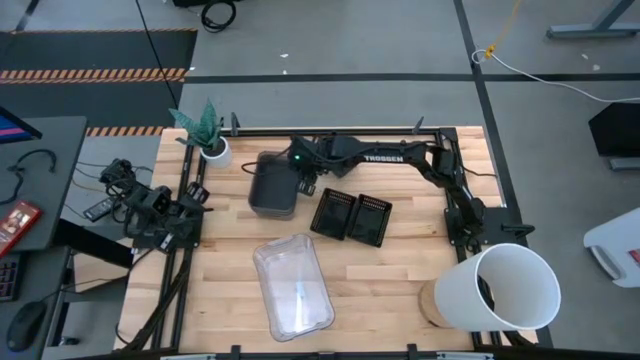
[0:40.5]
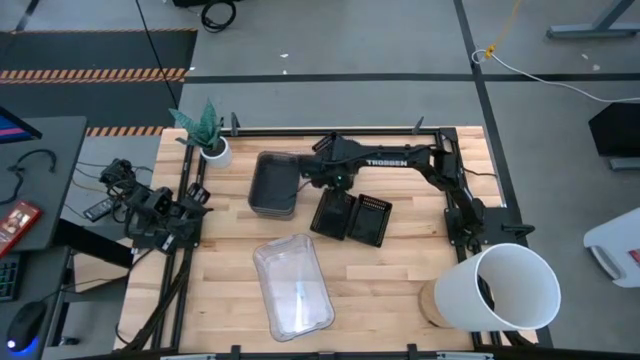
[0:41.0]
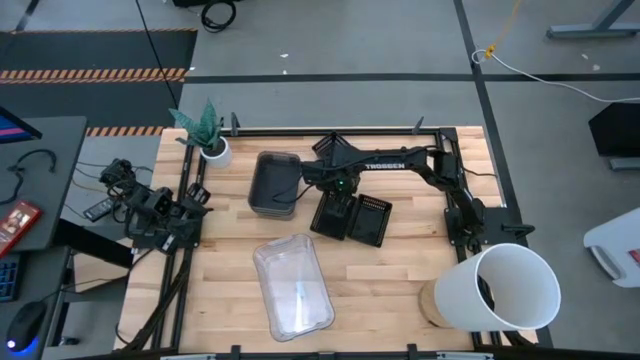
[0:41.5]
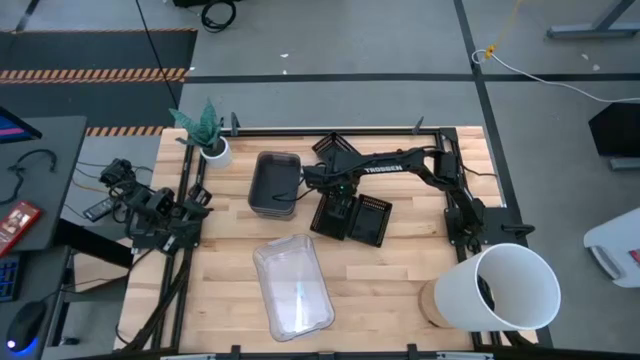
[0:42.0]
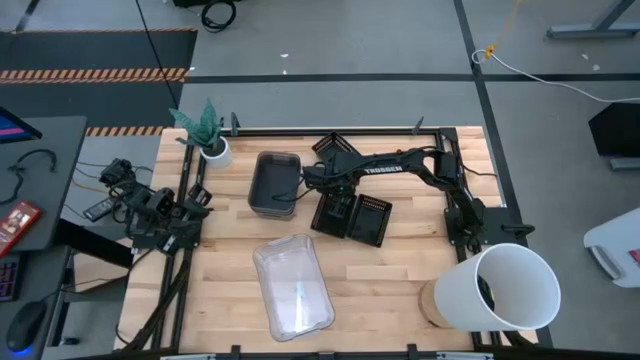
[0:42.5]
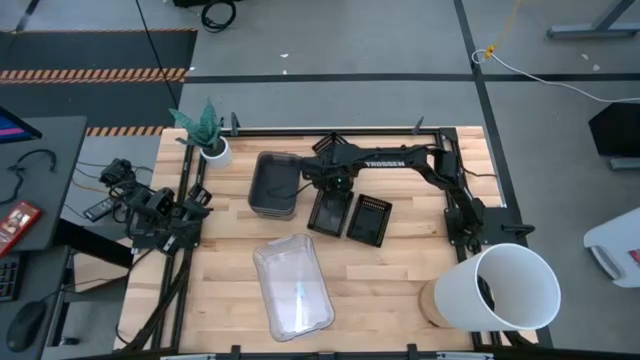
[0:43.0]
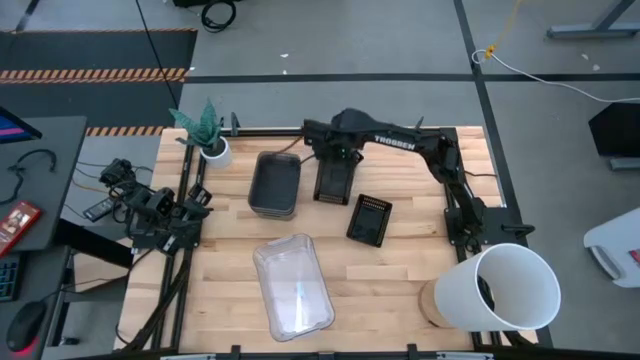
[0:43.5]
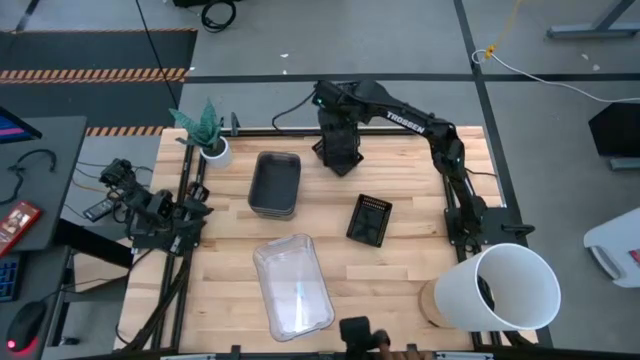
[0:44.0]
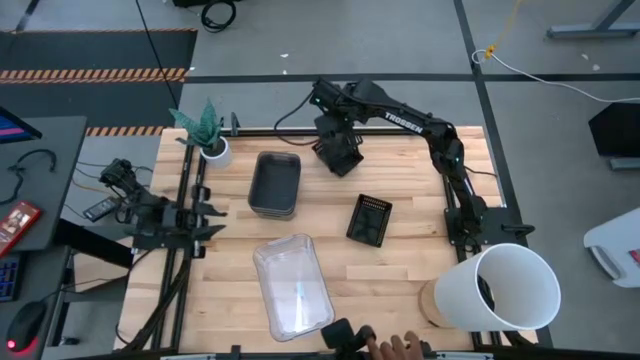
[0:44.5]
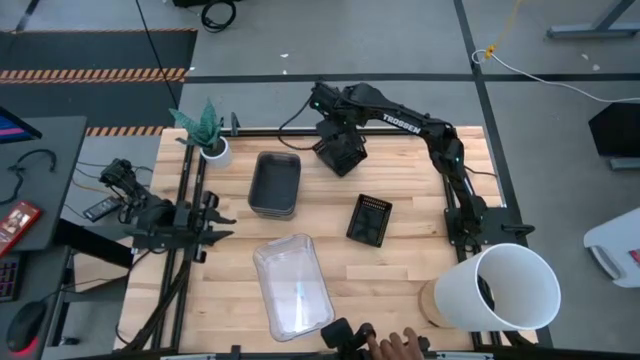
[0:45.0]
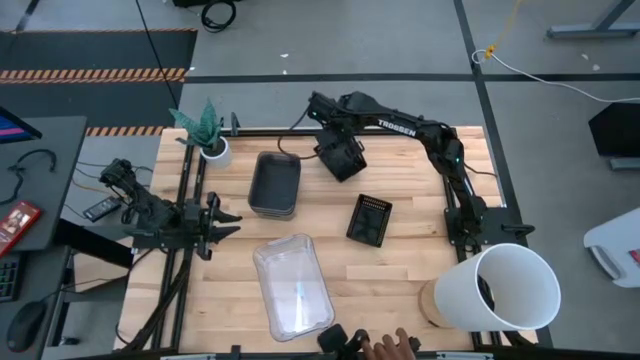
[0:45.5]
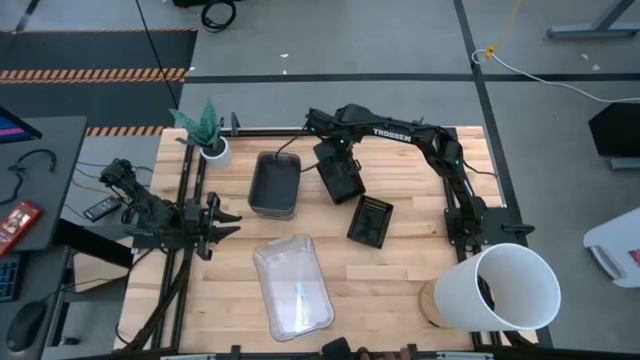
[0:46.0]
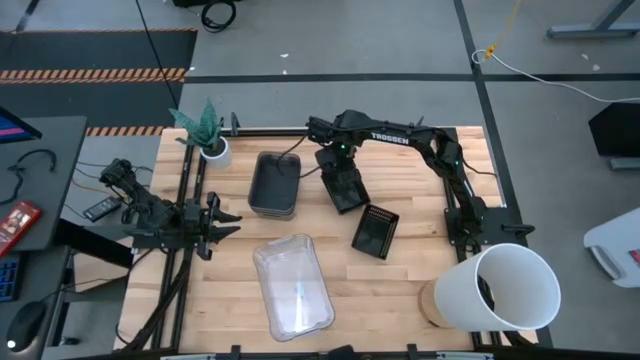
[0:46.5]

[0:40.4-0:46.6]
Stack the middle black bin on top of the top black bin

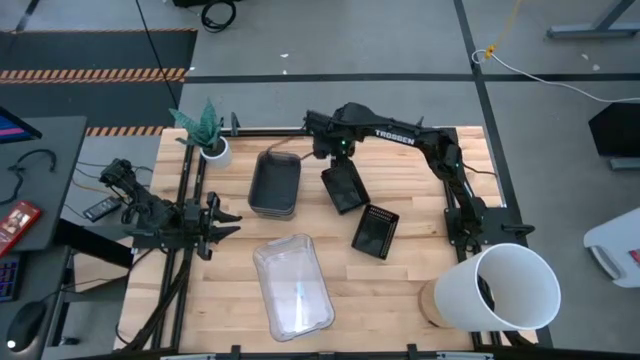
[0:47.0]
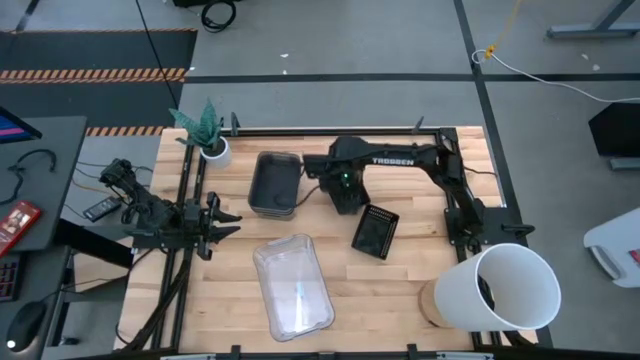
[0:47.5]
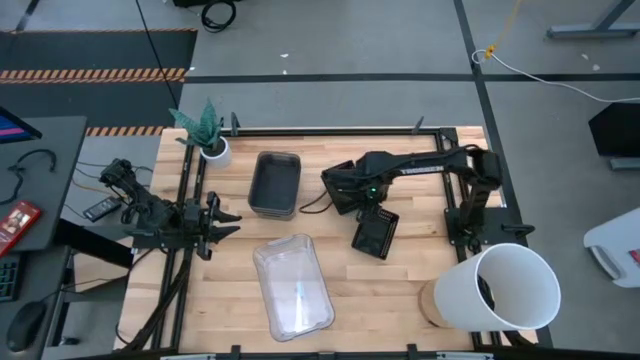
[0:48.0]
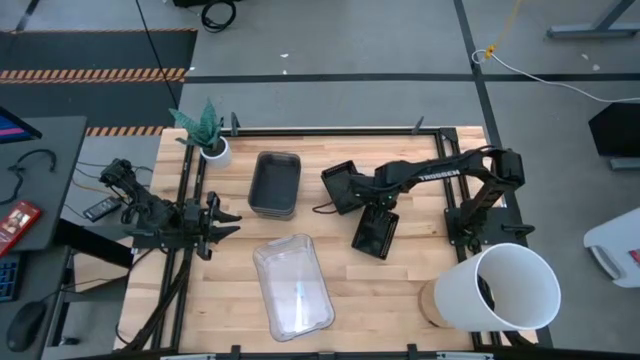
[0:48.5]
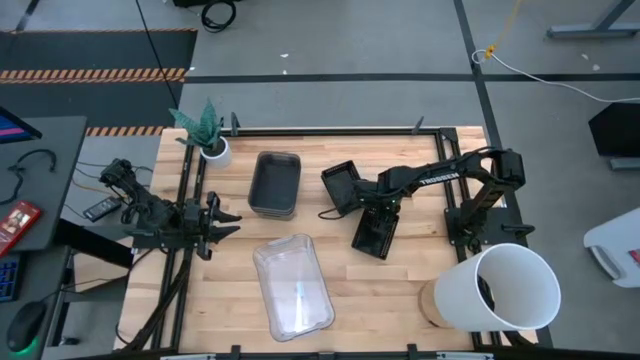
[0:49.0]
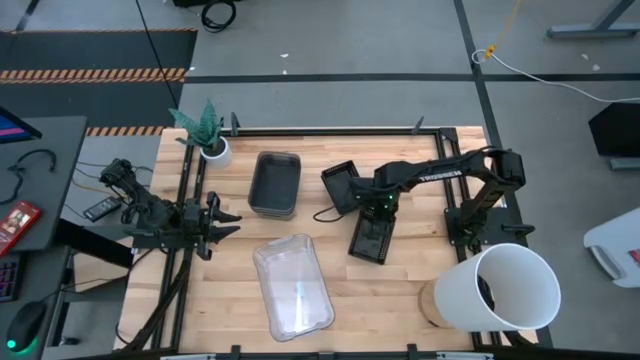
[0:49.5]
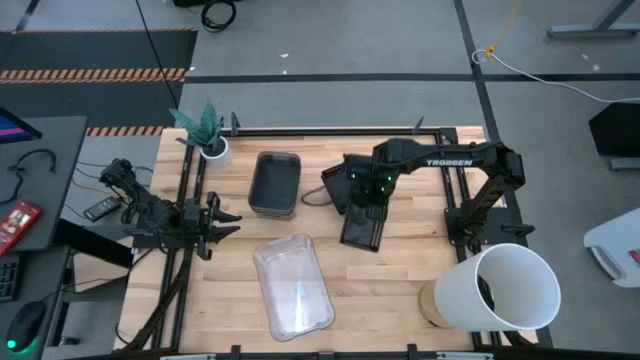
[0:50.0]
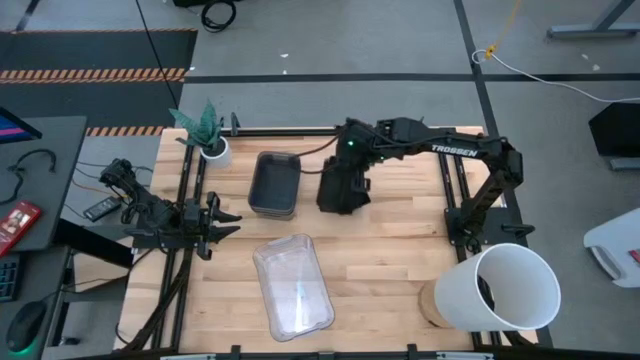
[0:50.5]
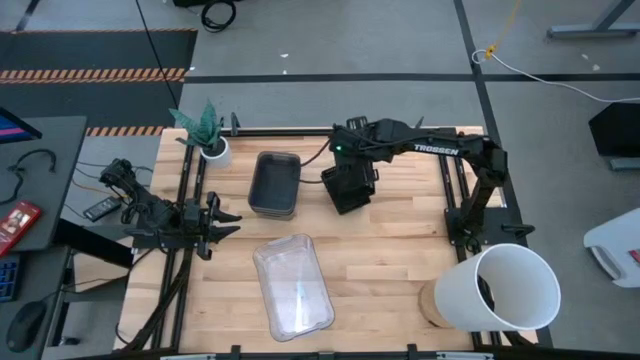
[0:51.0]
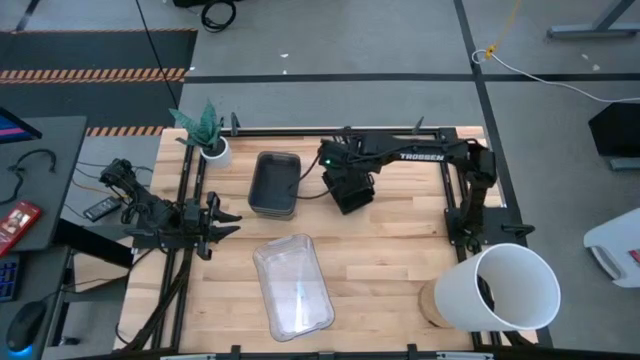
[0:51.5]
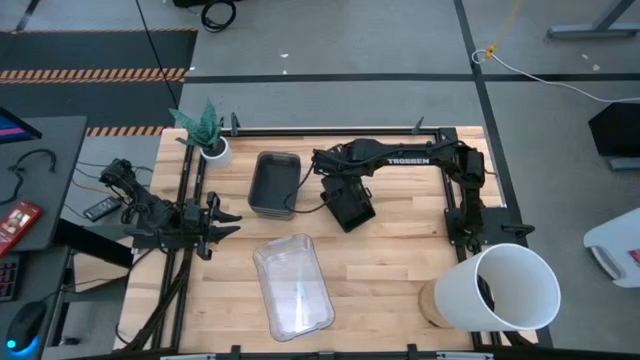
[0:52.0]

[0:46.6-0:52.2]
Stack the bottom black bin on top of the top black bin

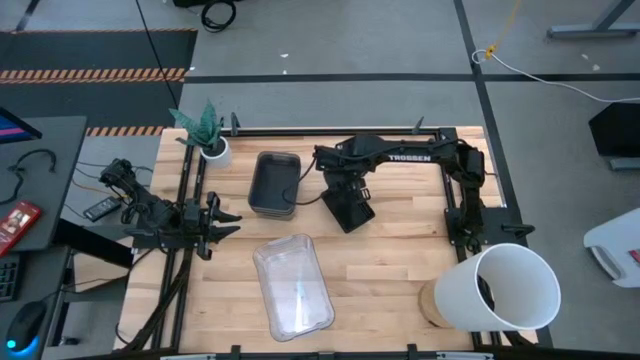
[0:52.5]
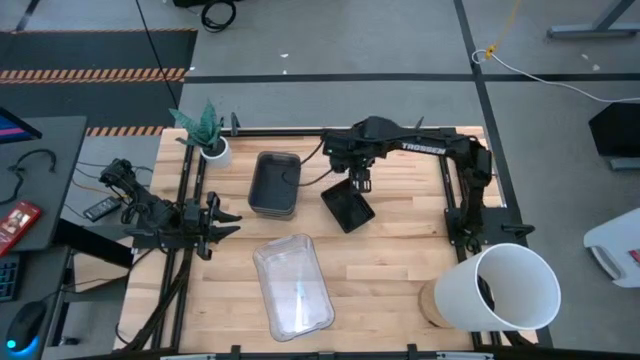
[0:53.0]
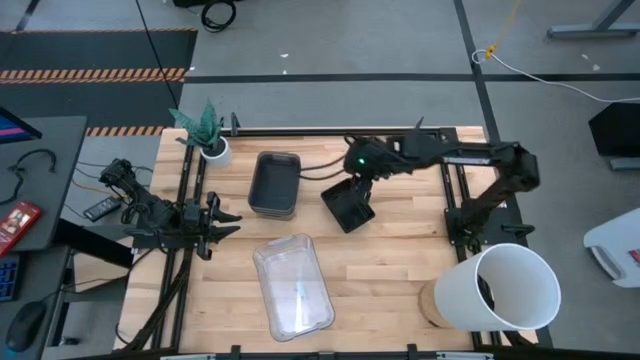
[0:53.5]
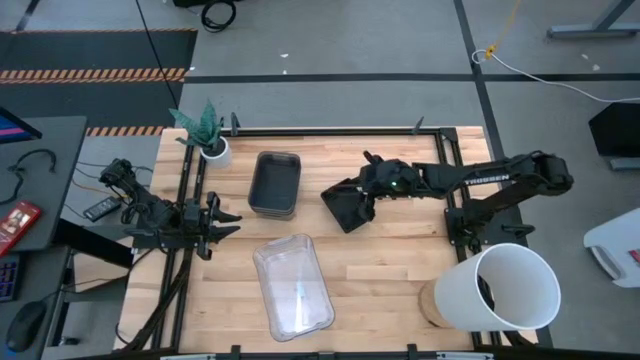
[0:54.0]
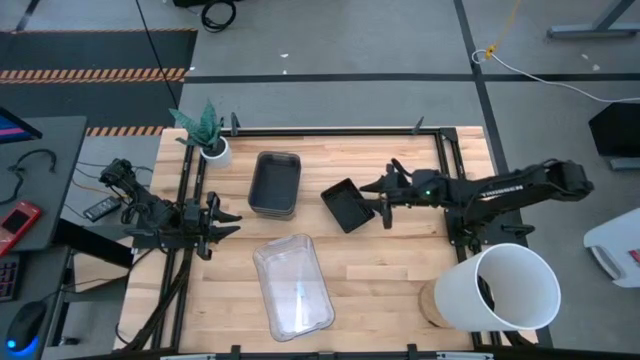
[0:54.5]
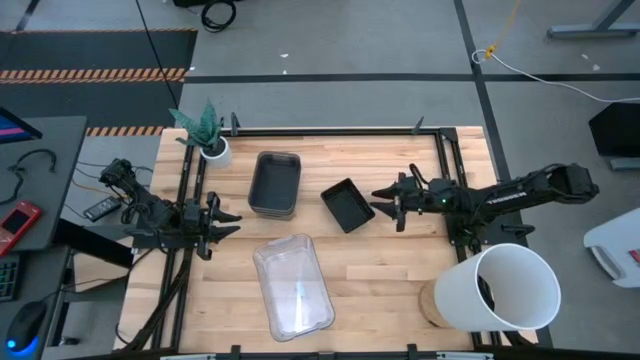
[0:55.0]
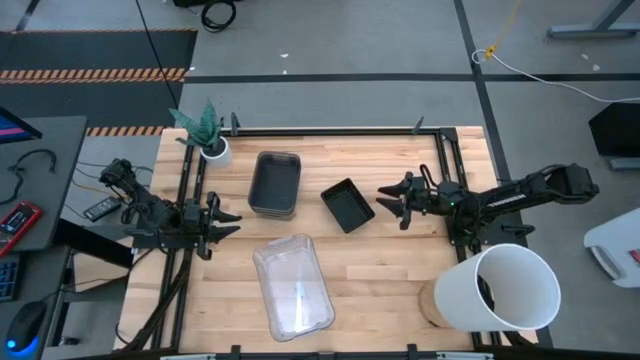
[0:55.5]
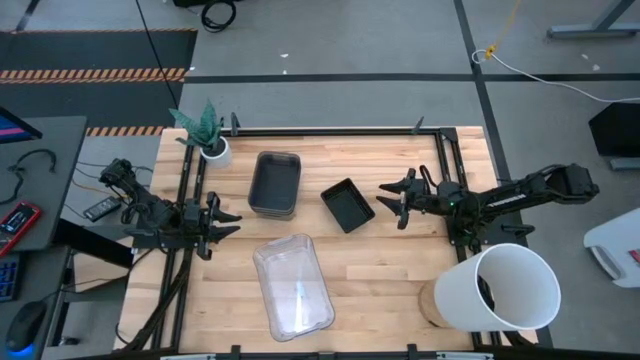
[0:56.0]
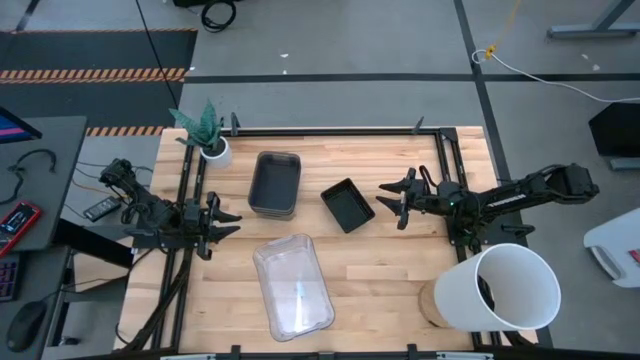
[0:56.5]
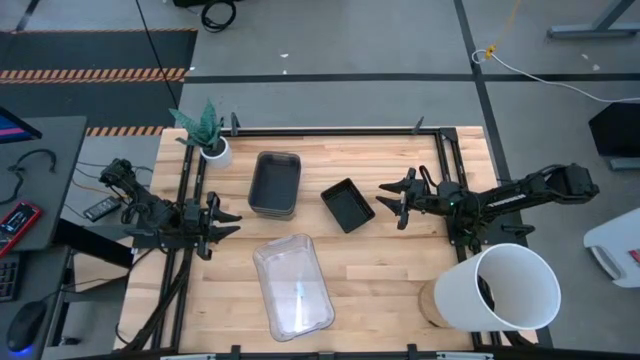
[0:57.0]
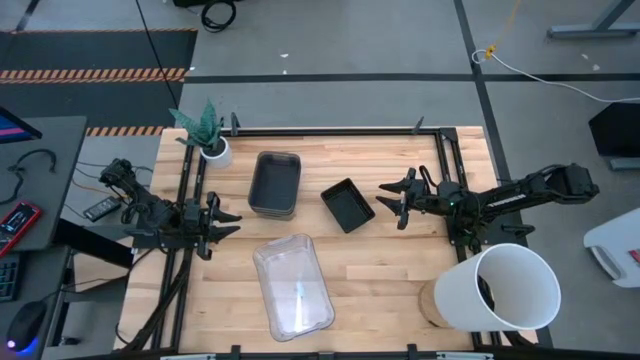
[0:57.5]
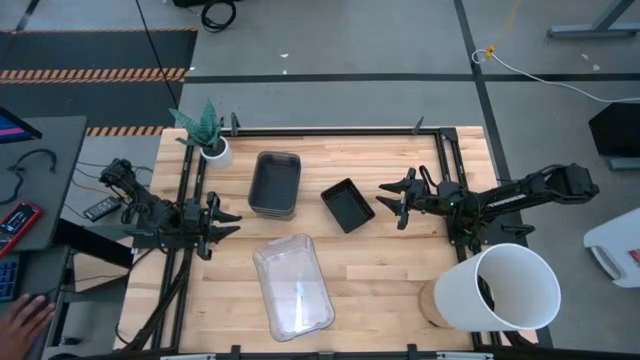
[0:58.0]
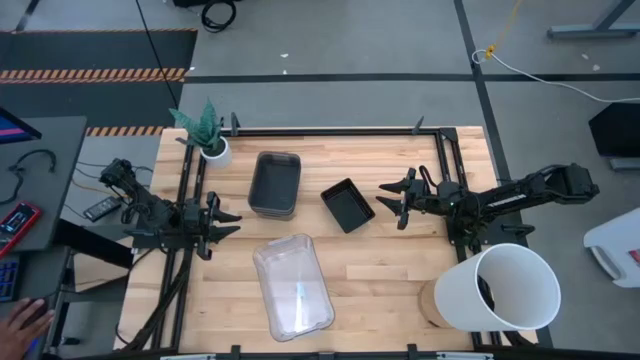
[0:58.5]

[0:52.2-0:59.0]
Return to Home Position
